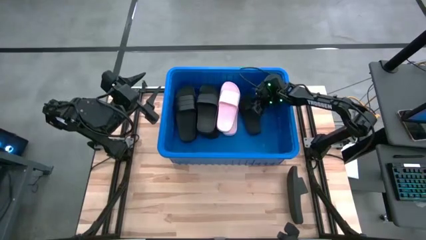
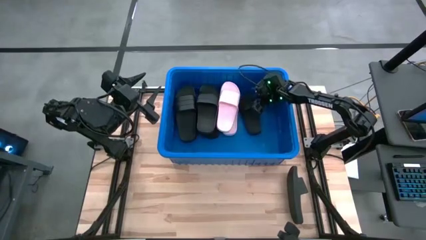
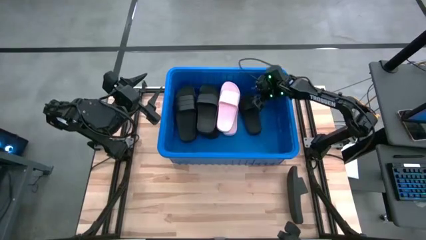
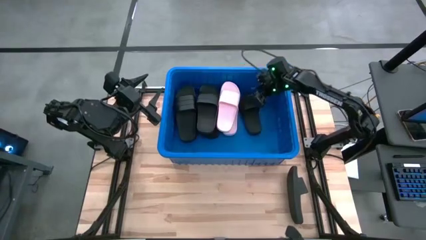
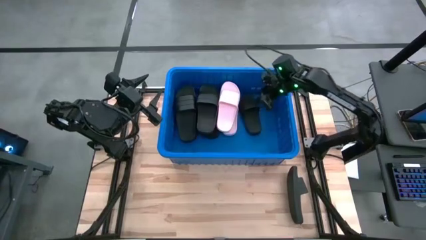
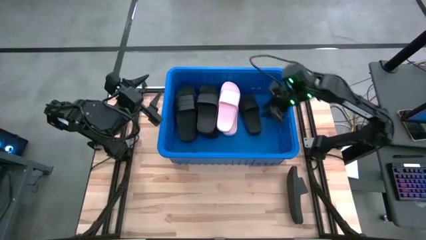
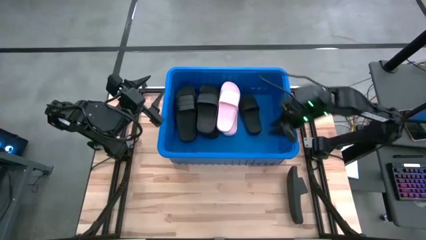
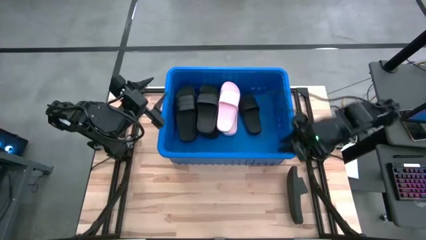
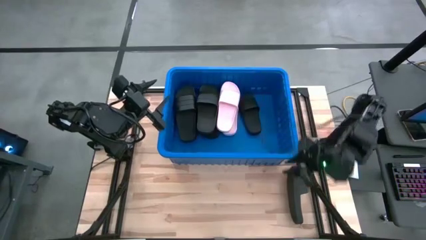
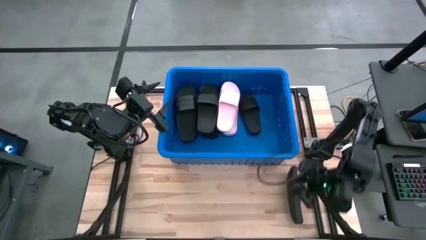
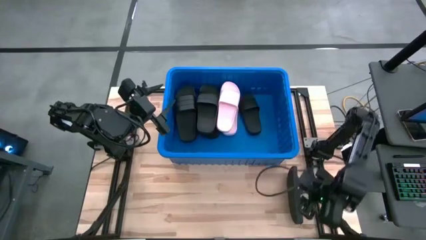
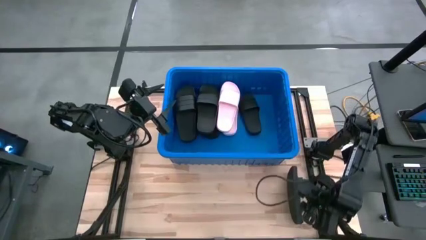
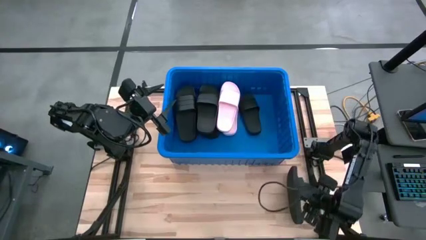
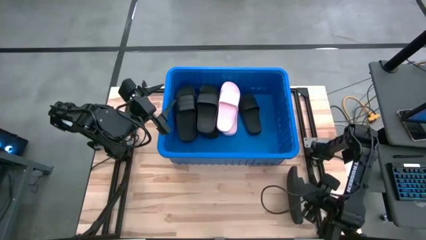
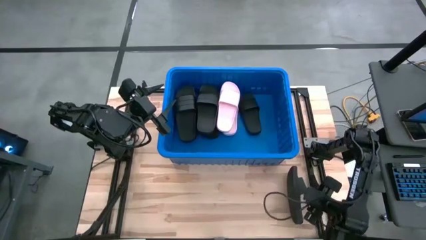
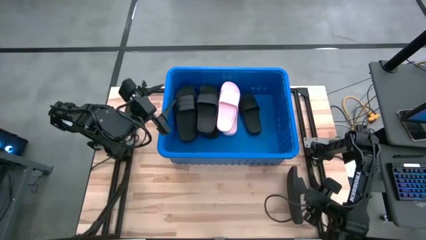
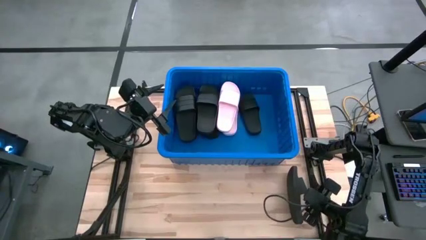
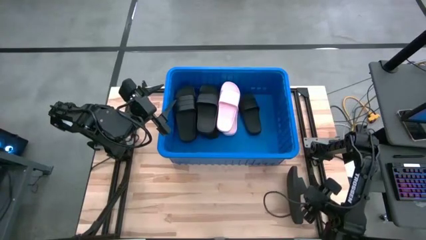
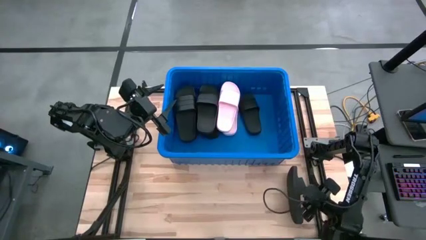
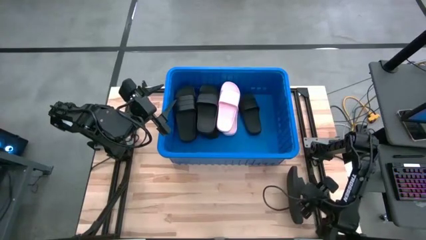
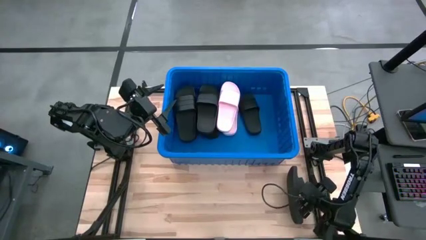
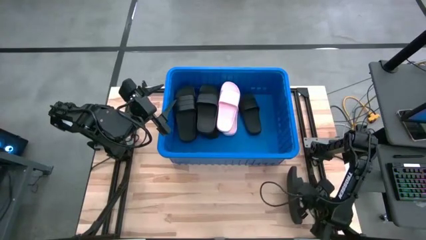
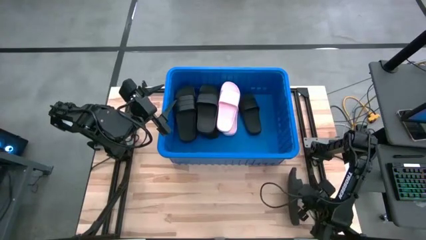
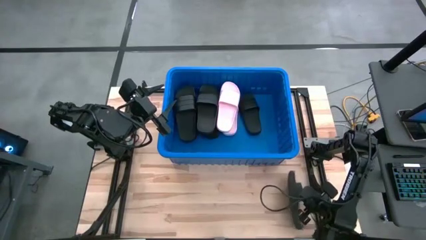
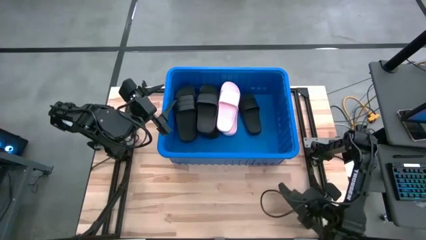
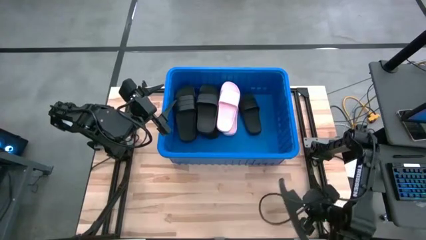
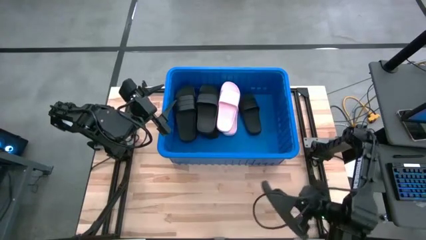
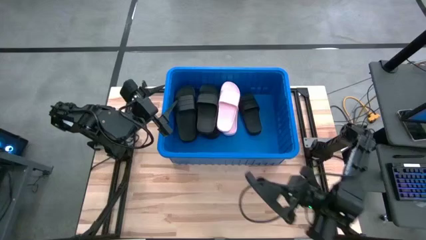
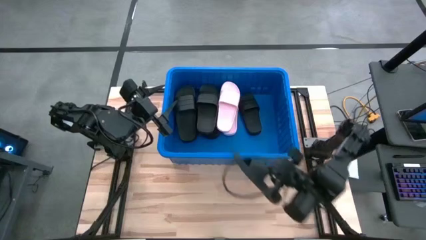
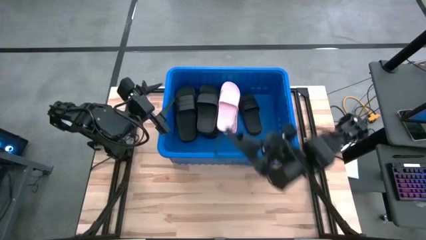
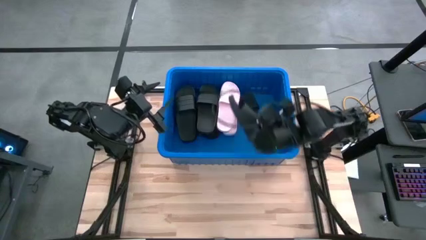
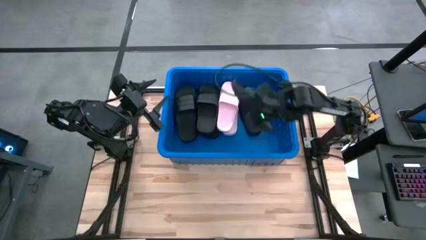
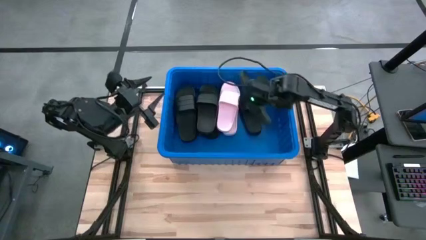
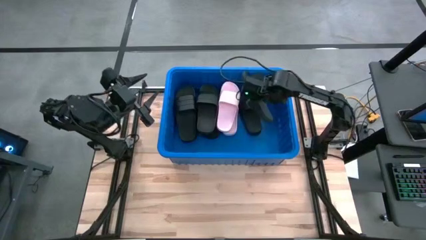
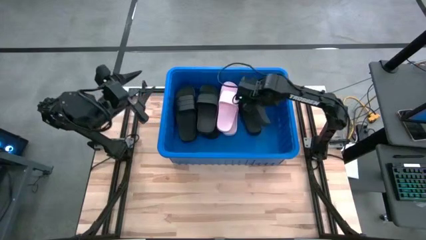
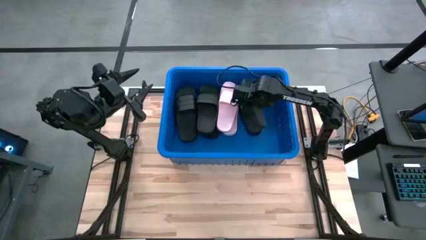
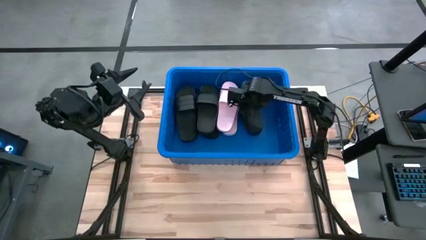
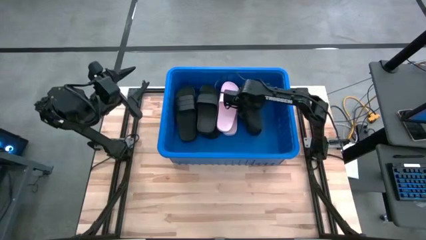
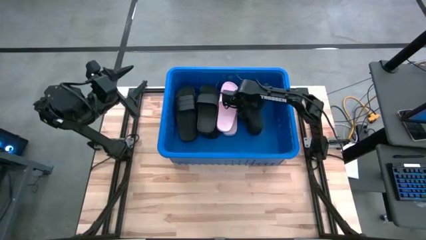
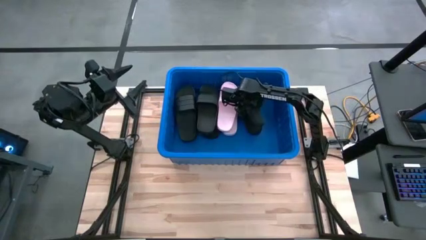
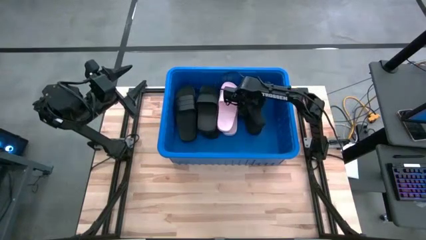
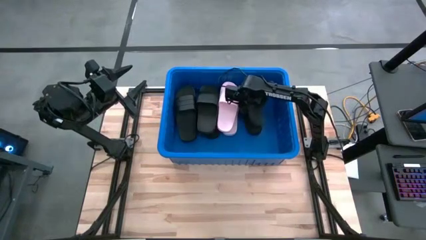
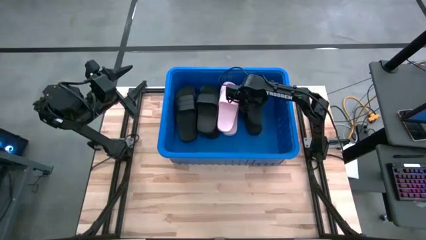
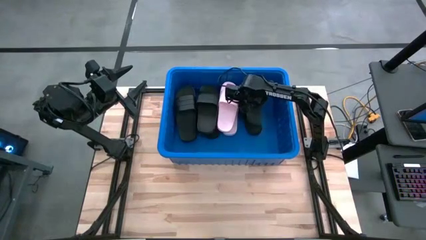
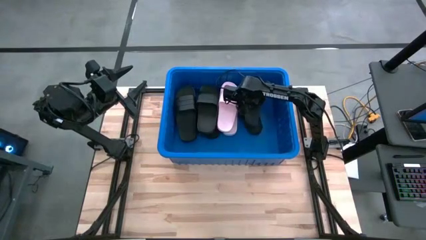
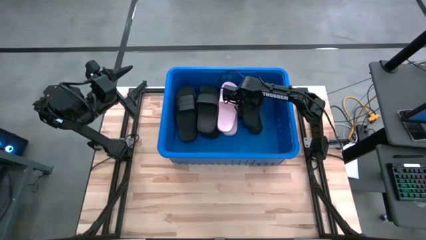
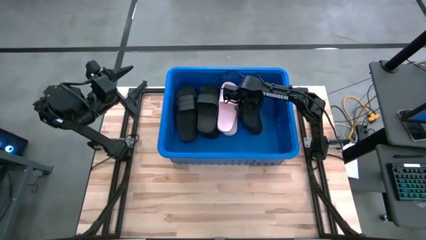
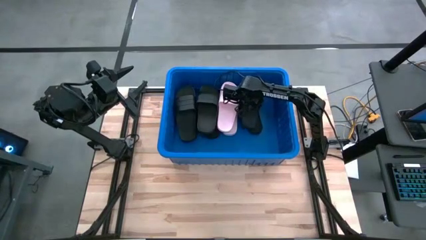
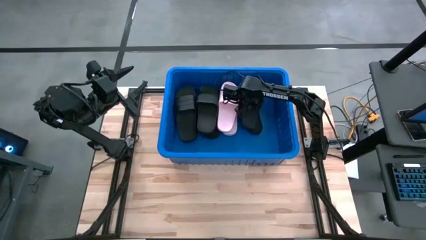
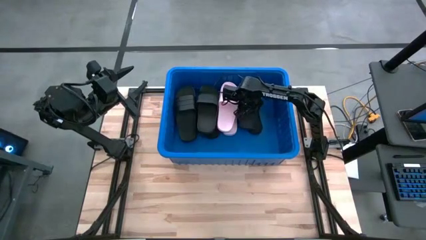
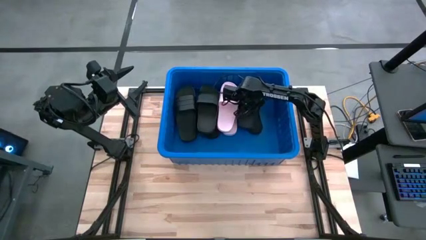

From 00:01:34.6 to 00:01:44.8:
Task: Pick and place slides into bin
Put the black slide into the blue bin
